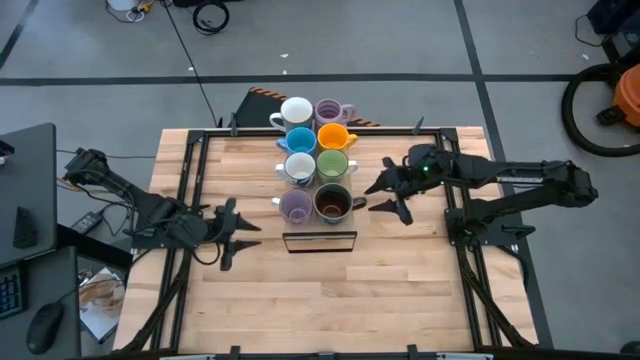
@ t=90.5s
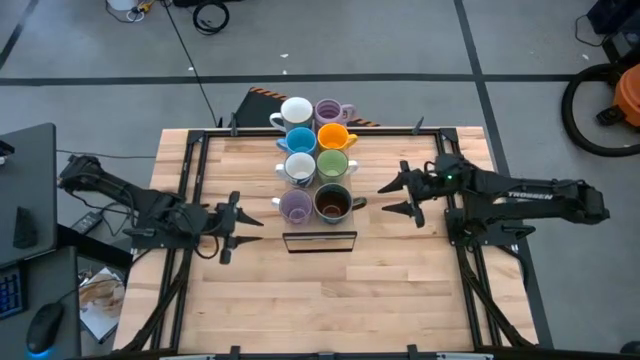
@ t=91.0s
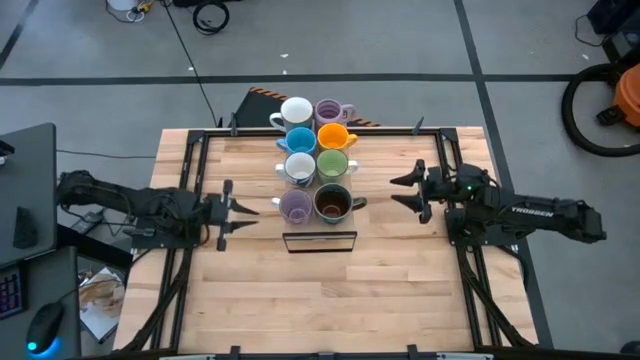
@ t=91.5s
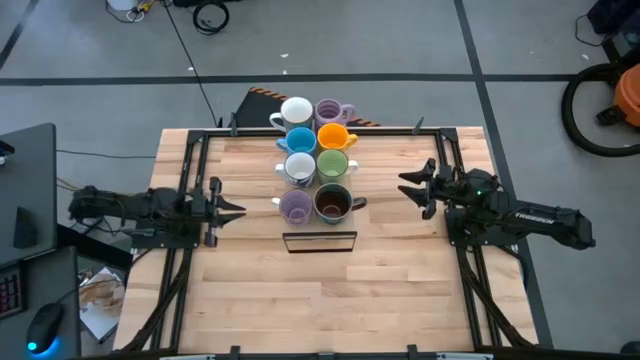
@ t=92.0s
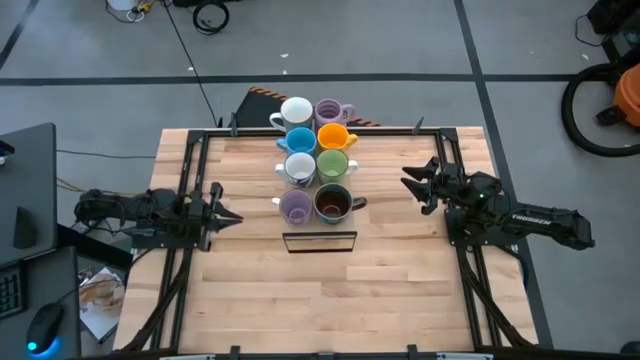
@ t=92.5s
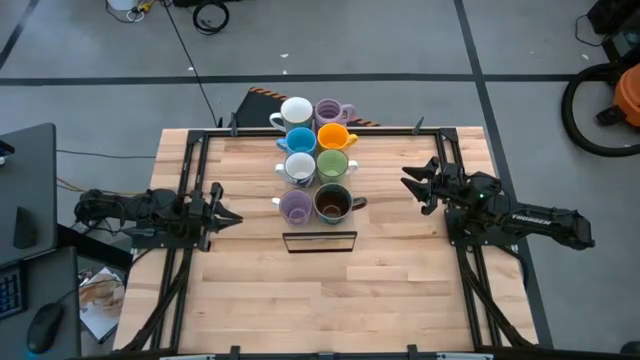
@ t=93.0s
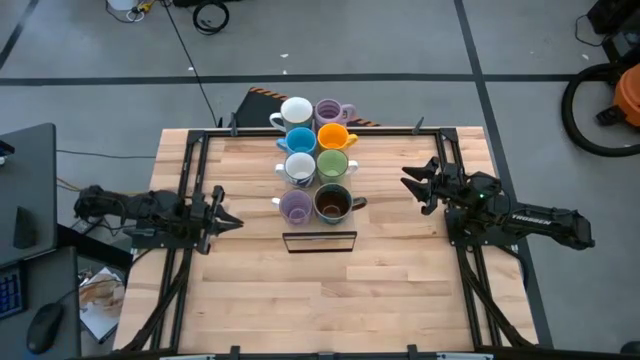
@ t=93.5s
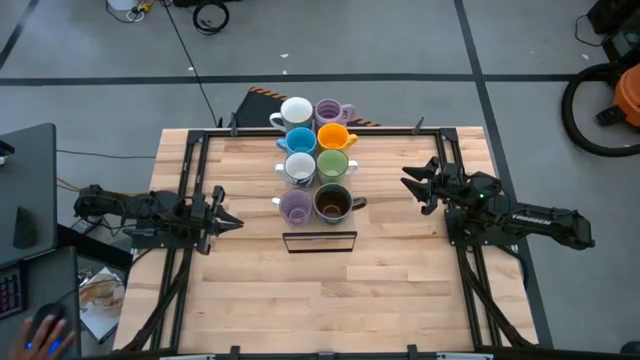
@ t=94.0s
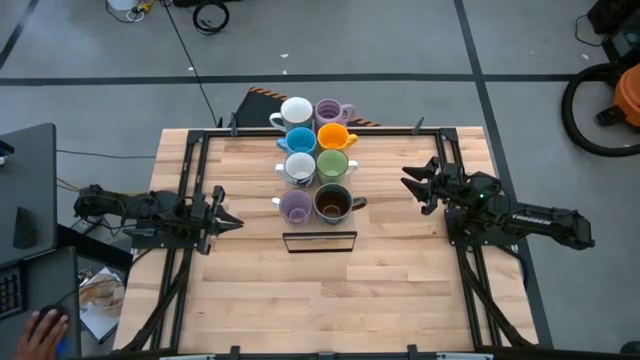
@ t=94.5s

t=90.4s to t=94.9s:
Task: Place coffee mugs
Return to Home Position

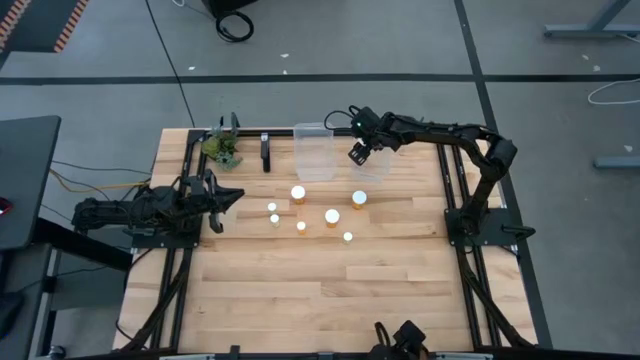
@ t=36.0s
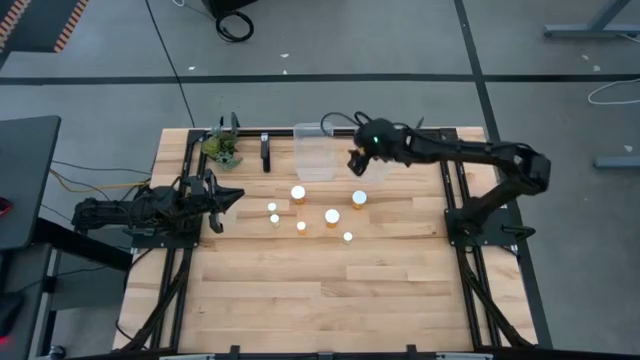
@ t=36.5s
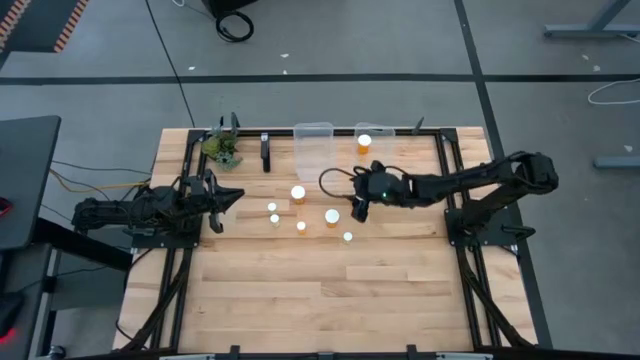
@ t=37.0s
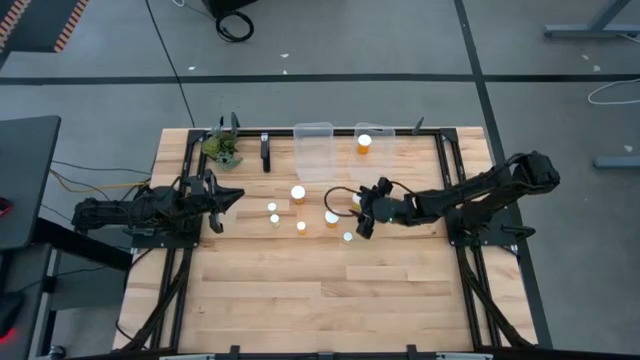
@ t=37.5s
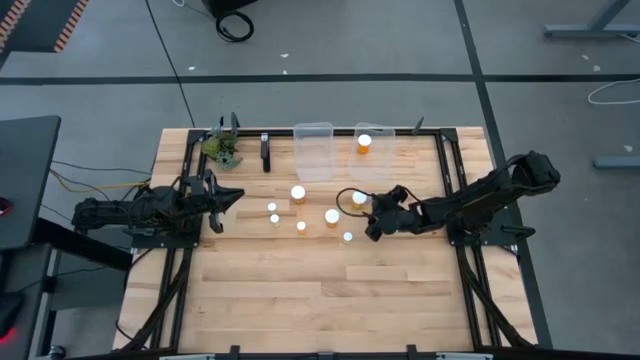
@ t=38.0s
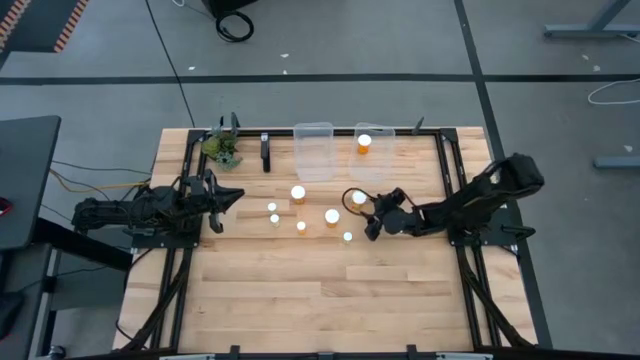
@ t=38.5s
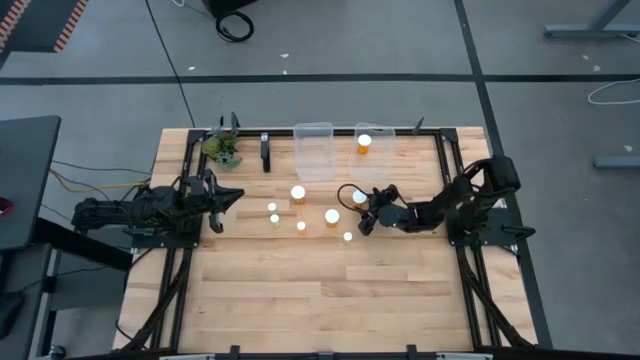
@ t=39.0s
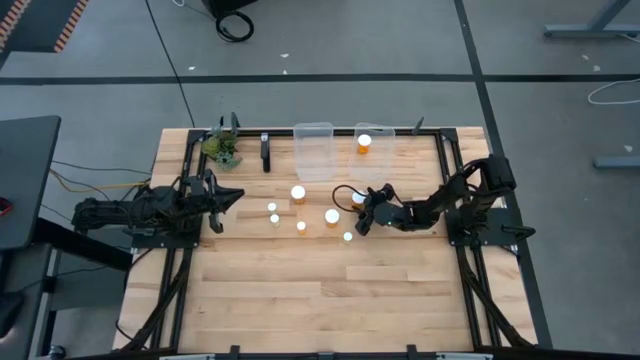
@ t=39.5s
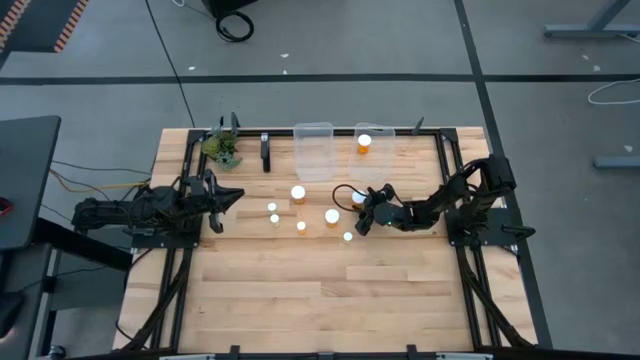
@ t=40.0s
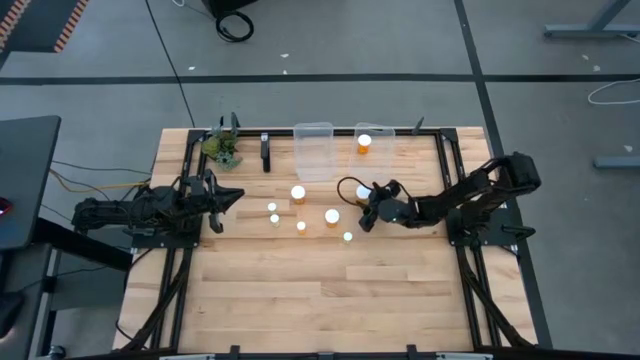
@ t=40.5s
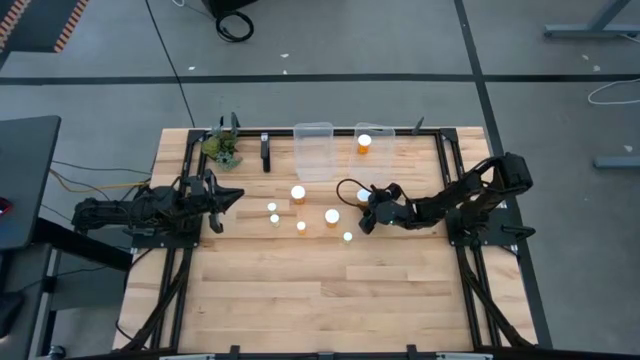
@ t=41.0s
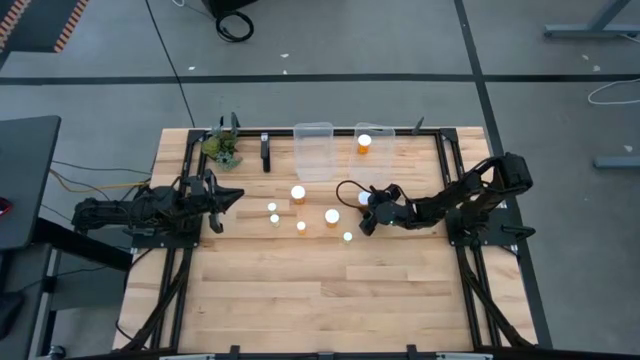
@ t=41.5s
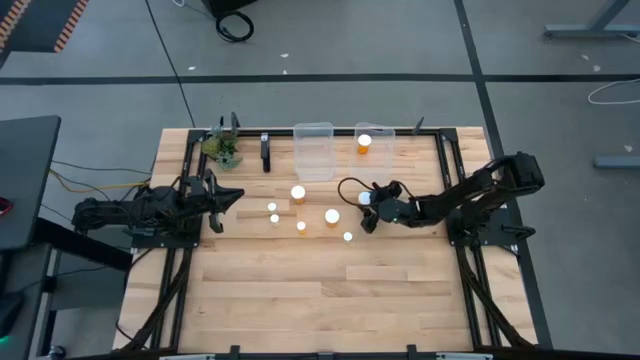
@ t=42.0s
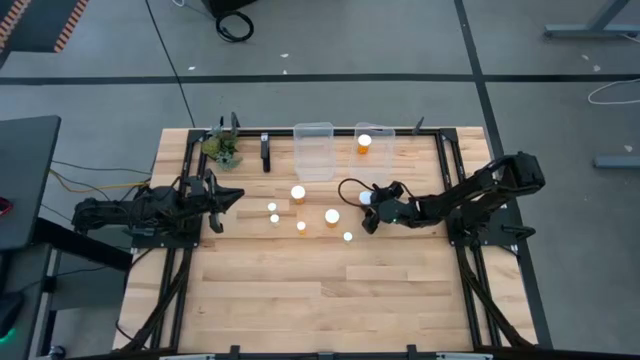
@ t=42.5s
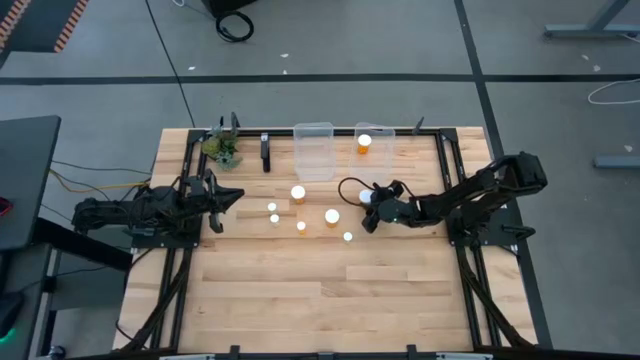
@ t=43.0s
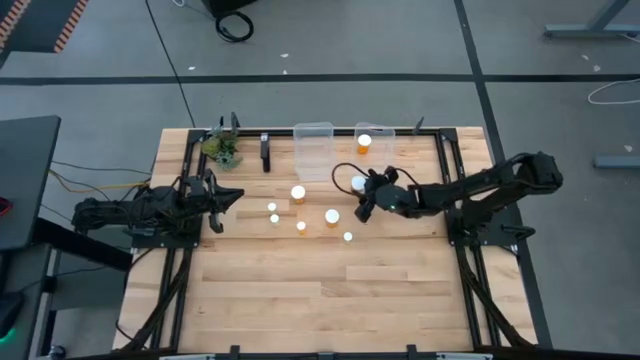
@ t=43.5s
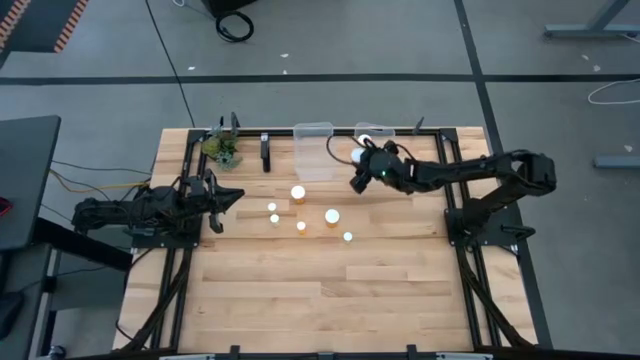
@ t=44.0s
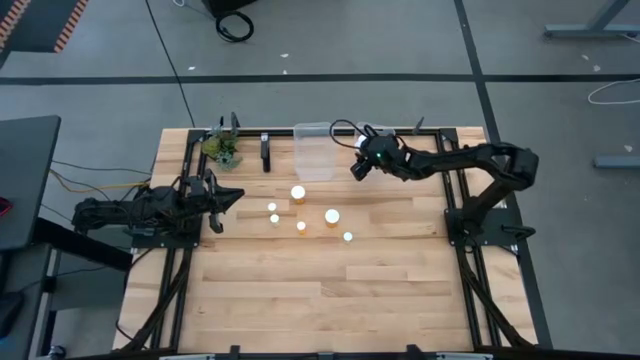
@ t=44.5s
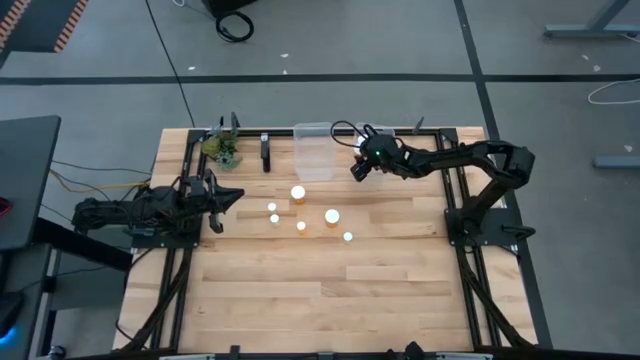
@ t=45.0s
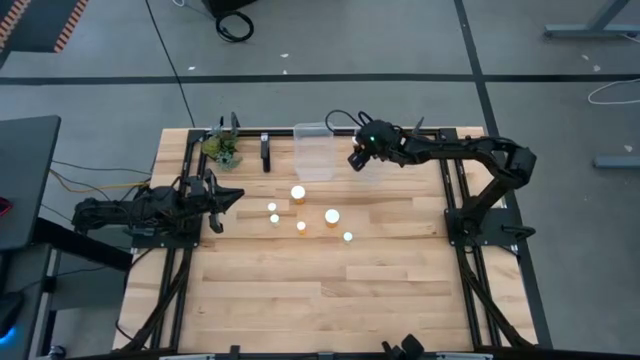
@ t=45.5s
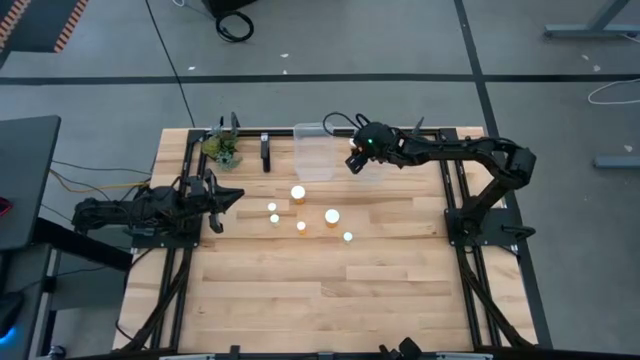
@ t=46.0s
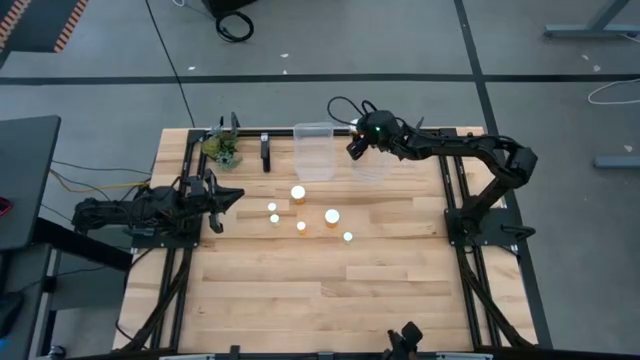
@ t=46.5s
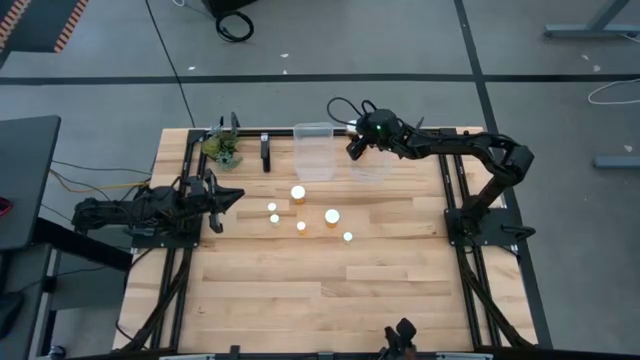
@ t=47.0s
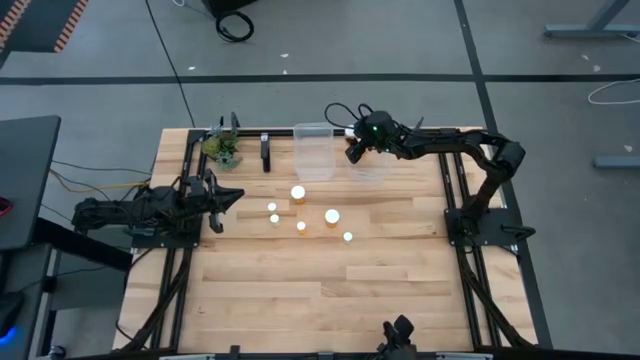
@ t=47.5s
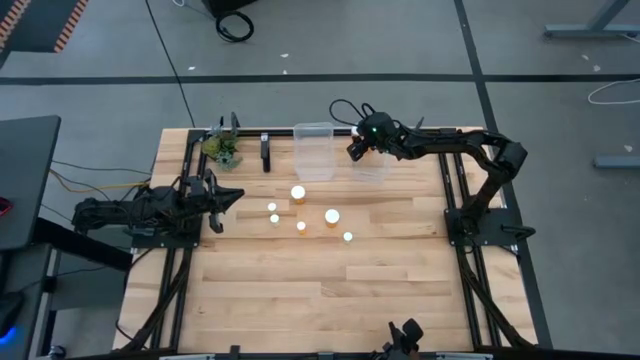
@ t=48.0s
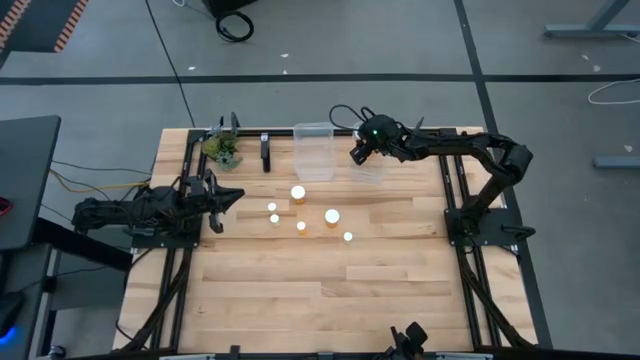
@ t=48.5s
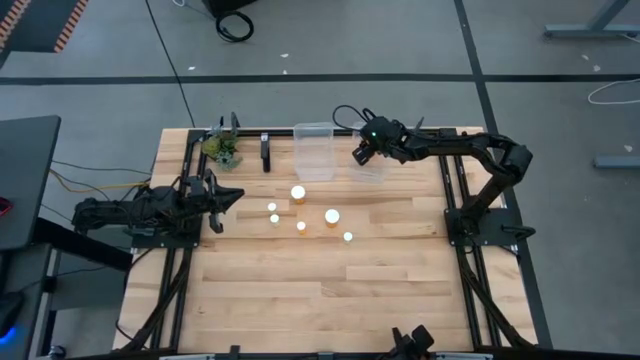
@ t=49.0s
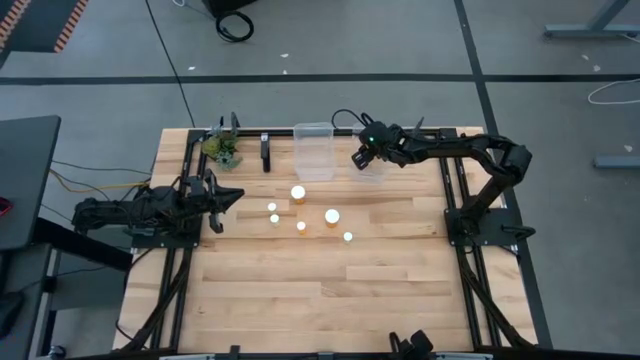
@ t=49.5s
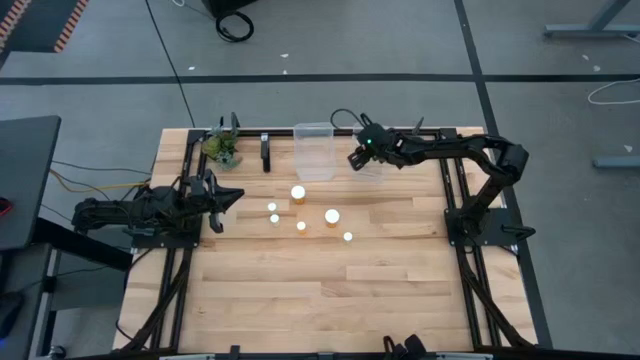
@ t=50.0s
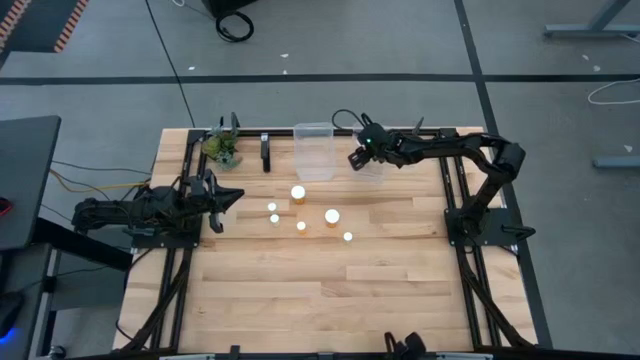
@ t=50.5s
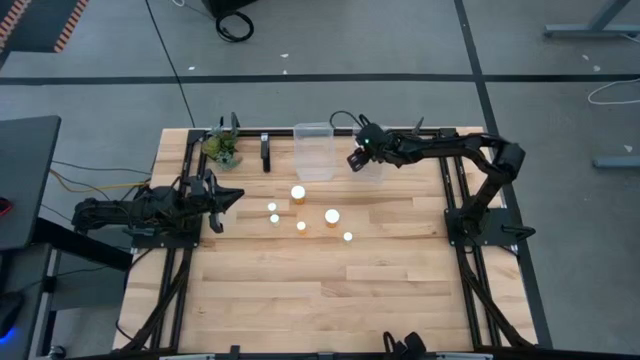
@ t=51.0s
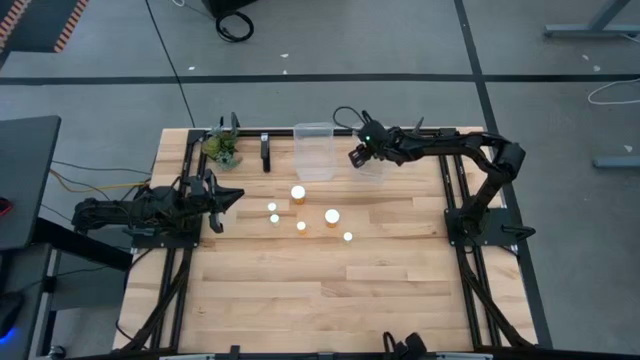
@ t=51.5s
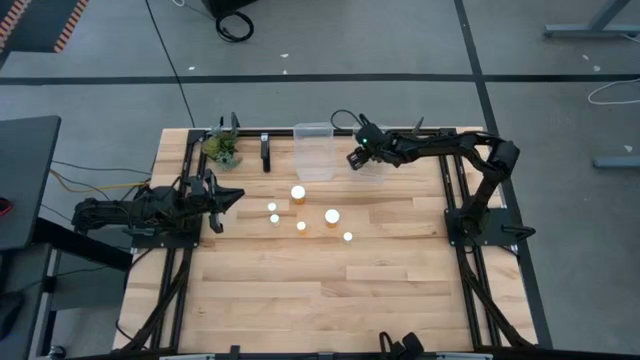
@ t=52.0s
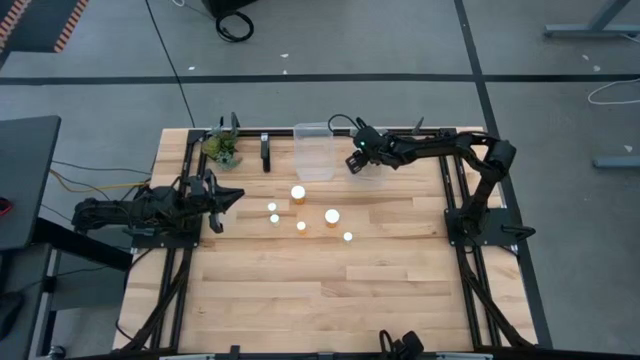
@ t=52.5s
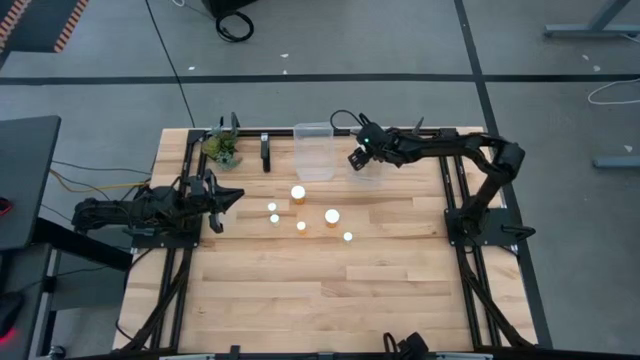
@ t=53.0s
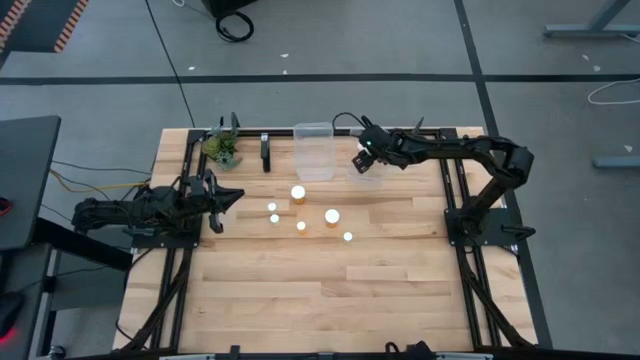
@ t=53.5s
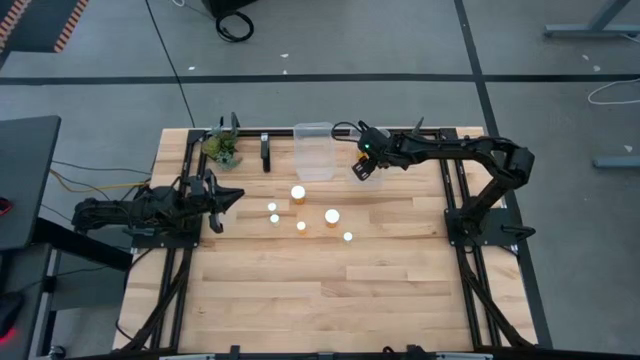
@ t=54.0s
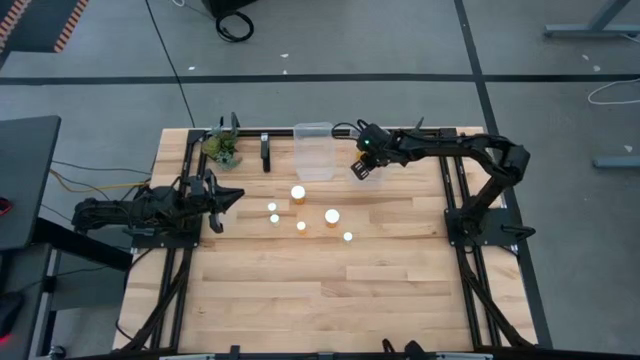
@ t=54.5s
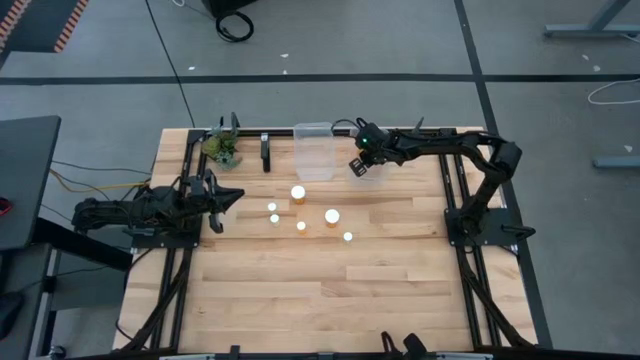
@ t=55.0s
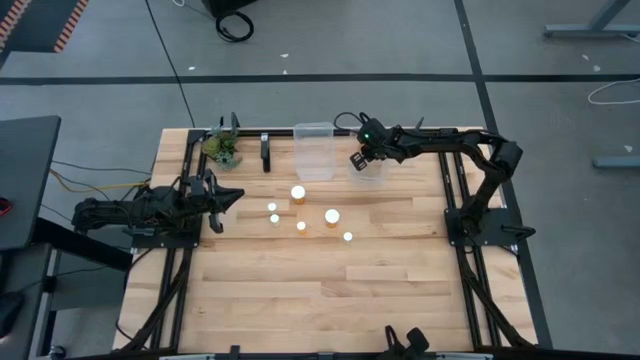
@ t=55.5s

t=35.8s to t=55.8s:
Task: Pick and place medicine bottles into bin by pill shape (circle, oval)
Put the top right big orange pill into the right transparent bin
